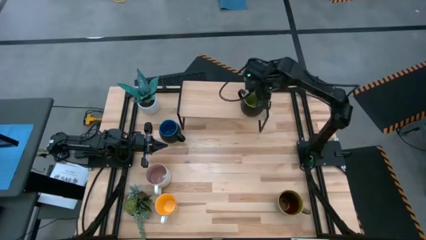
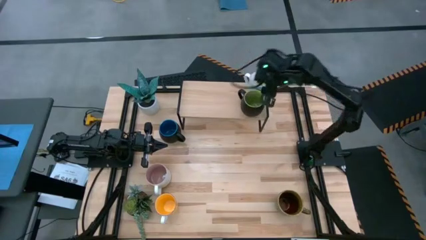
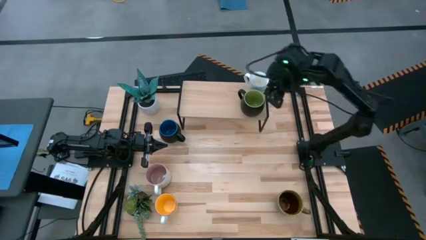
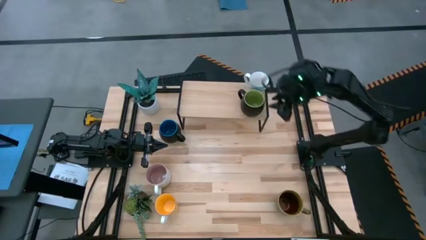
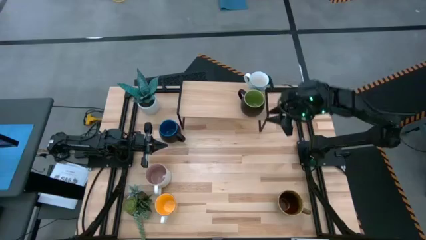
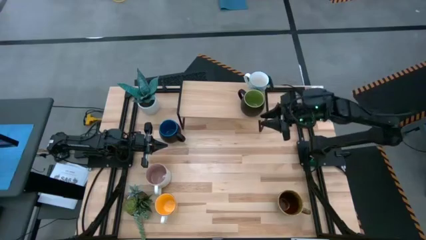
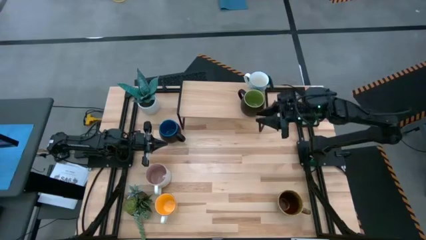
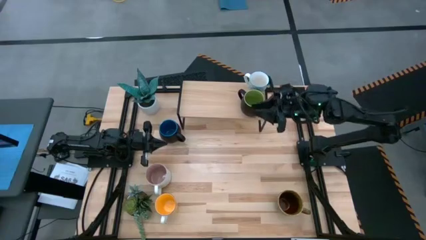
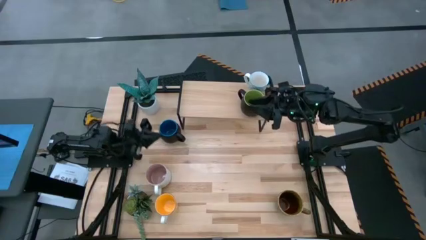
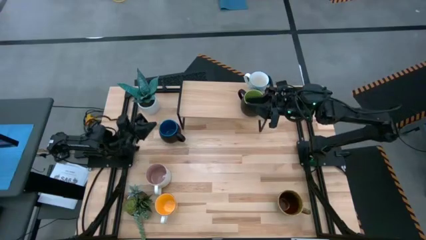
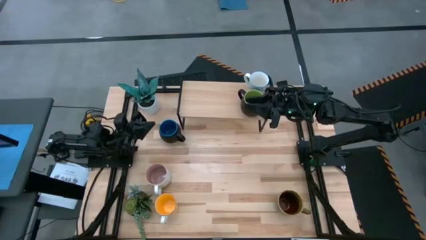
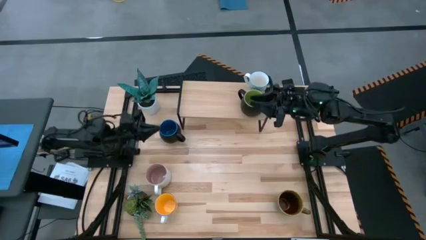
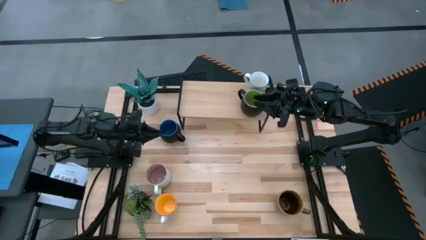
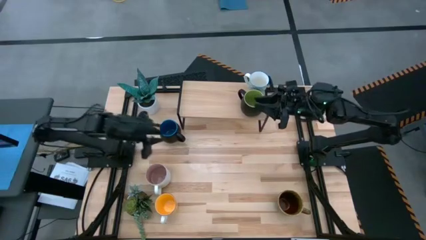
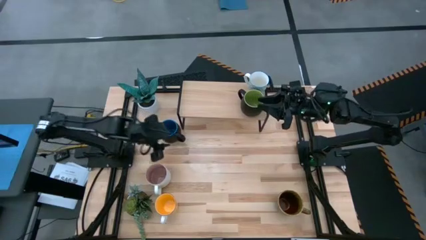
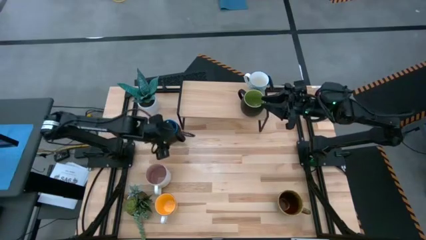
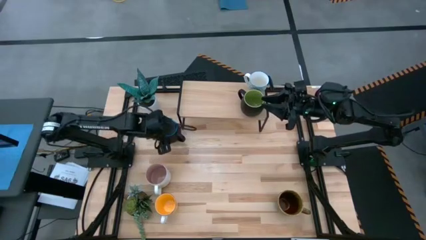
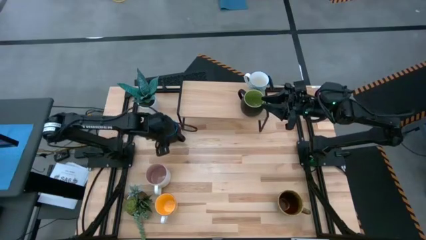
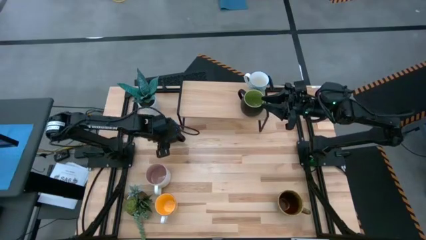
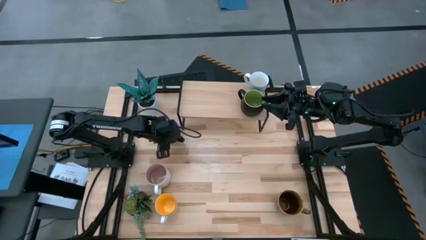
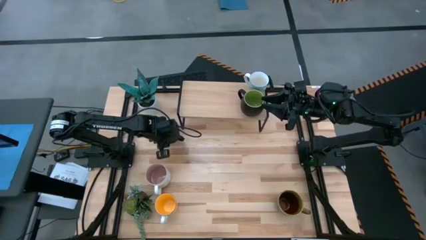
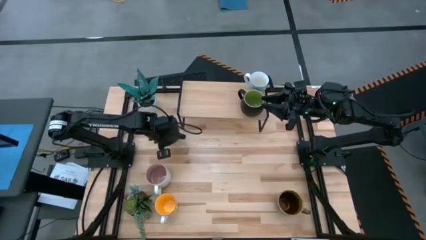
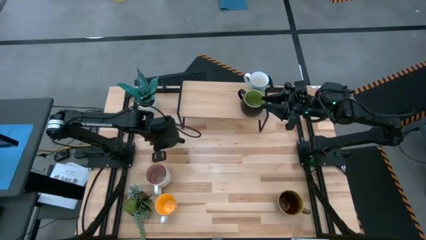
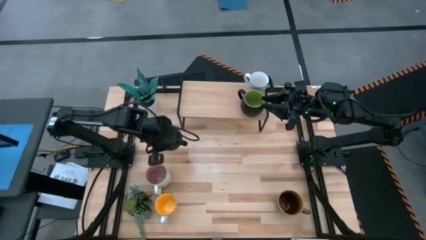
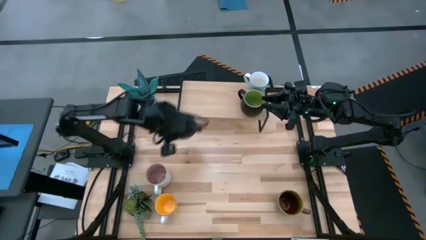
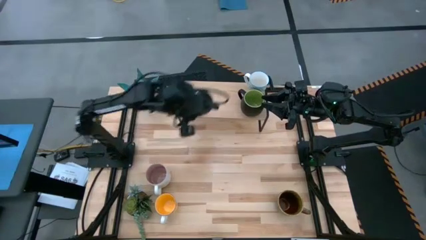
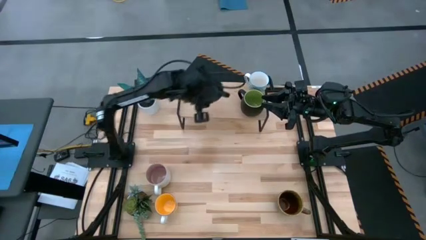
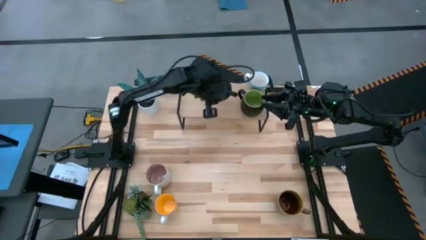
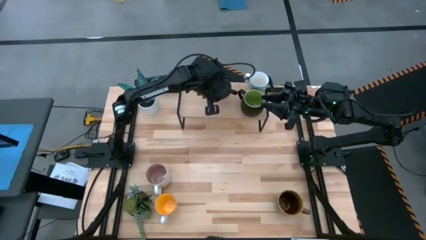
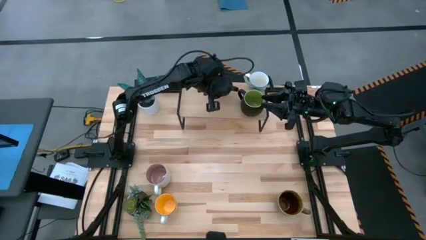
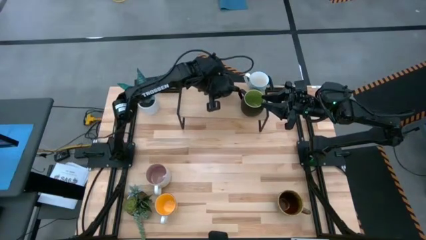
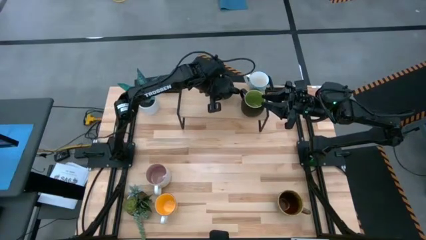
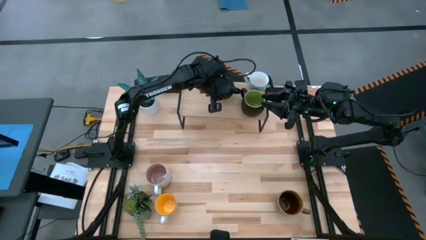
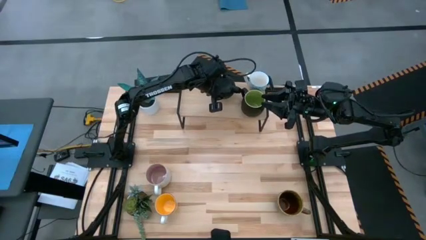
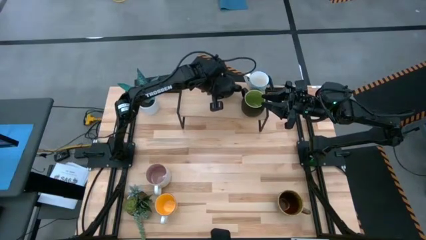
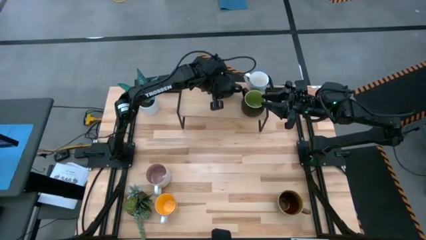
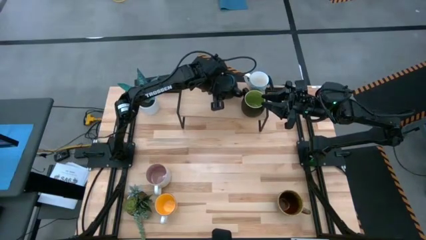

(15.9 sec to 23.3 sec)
Task: Place coffee mugs
Put the black-blue interior mug on the shelf

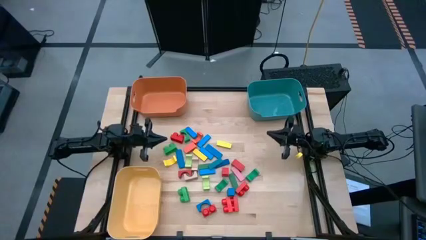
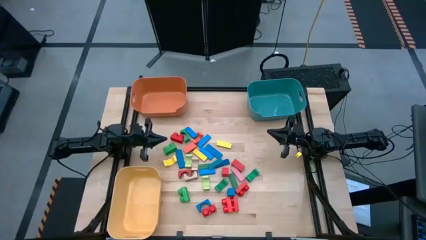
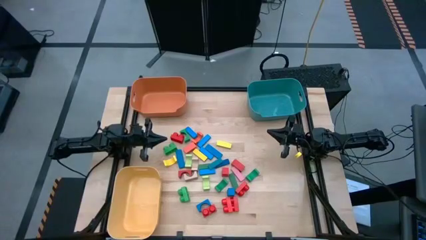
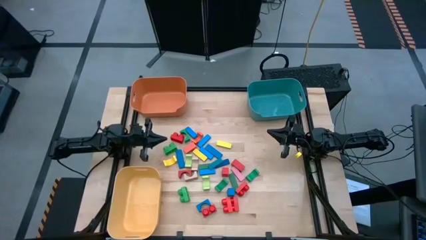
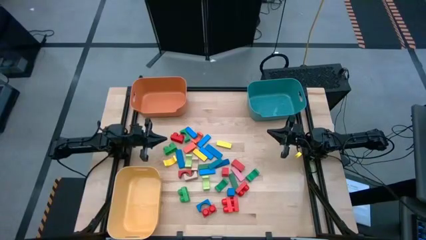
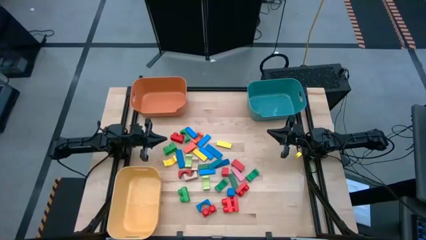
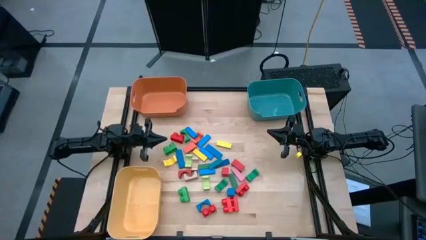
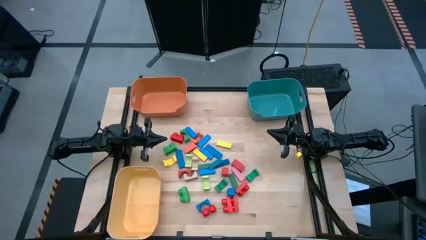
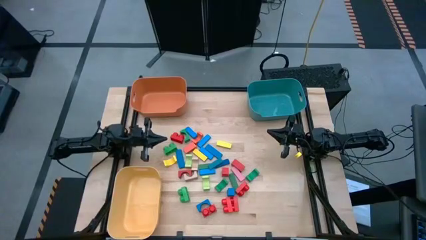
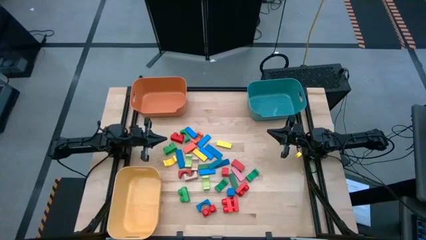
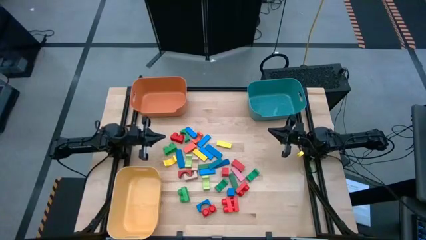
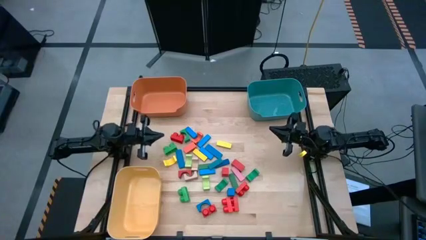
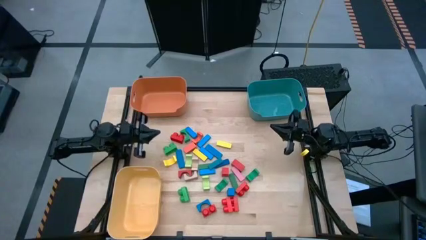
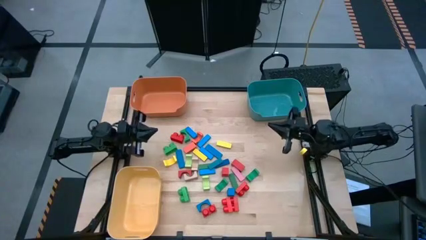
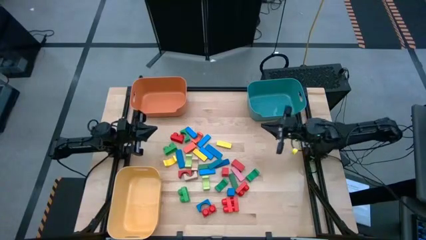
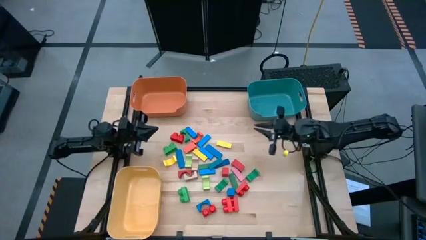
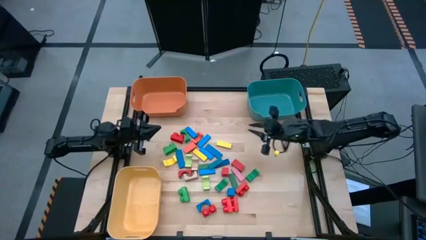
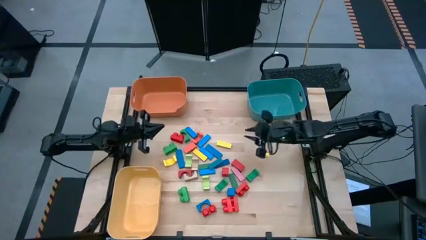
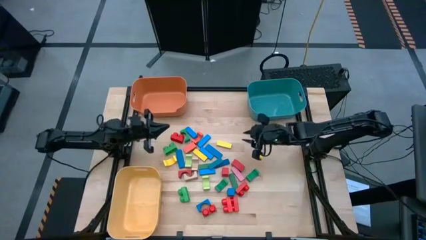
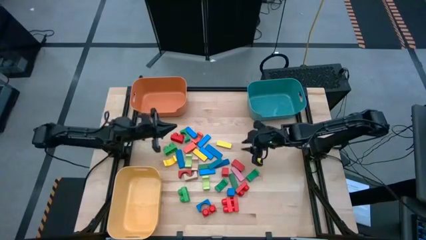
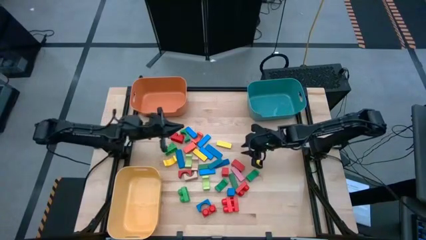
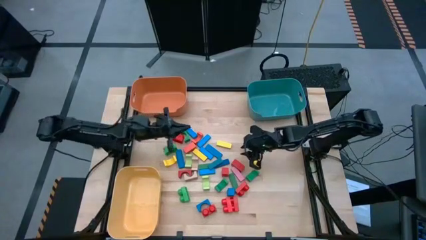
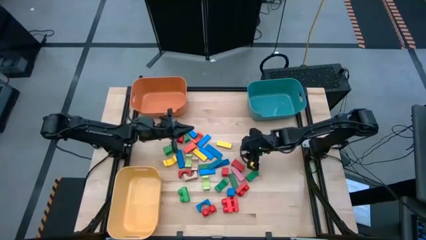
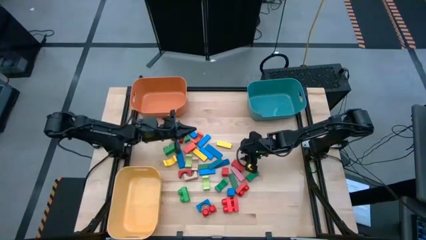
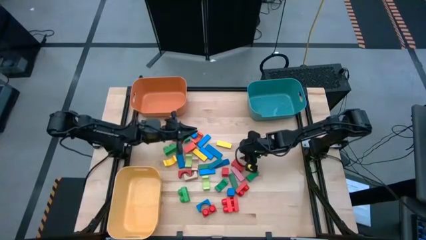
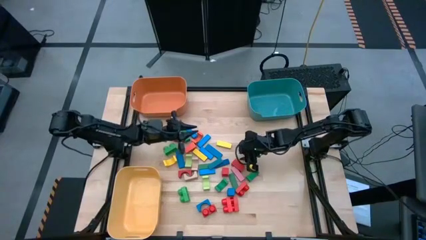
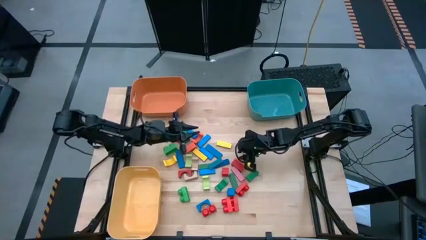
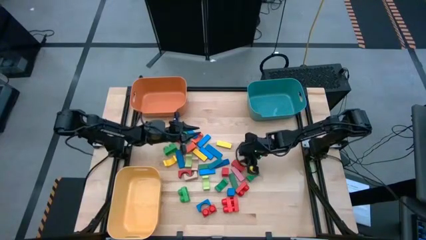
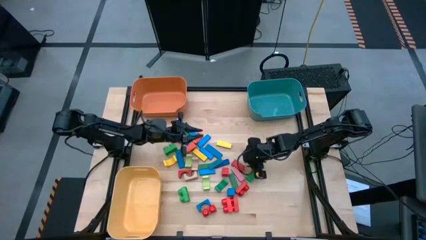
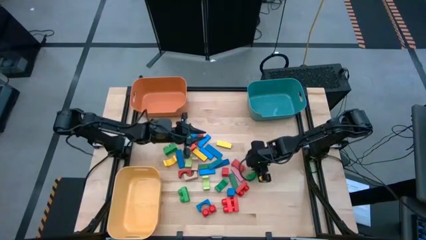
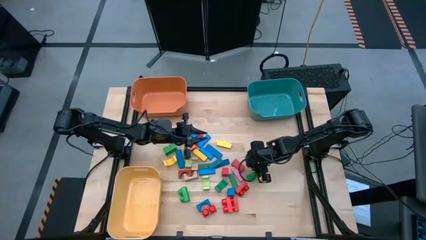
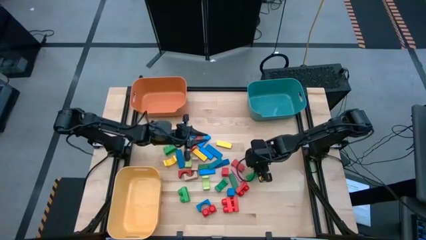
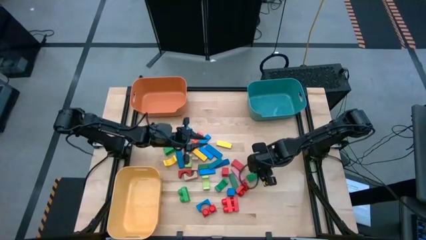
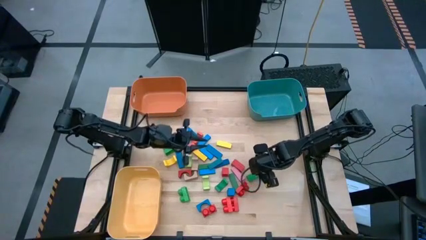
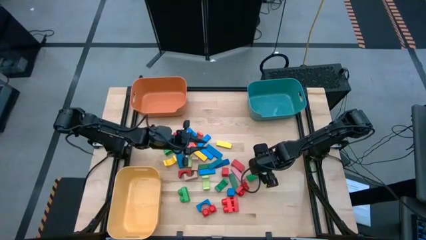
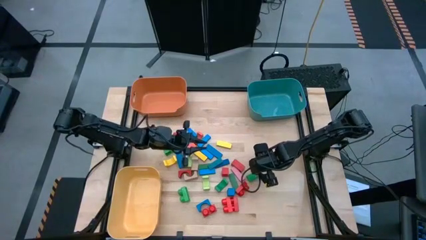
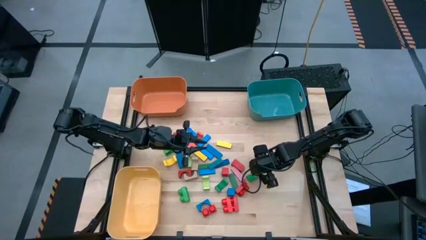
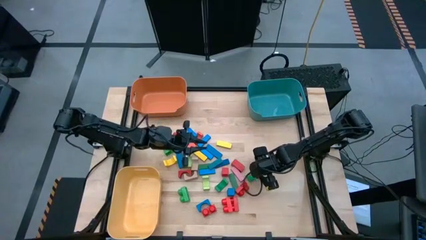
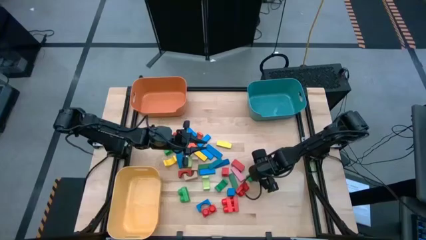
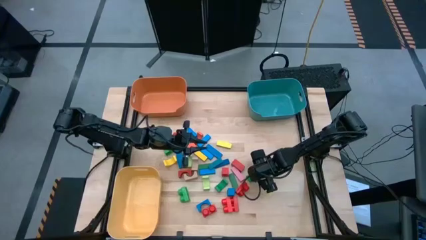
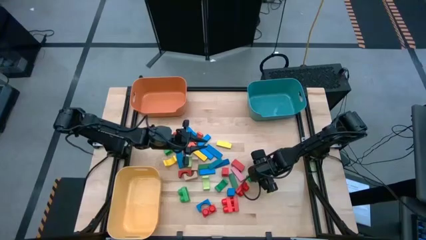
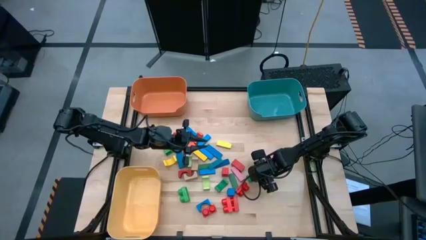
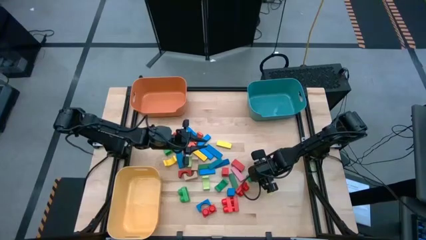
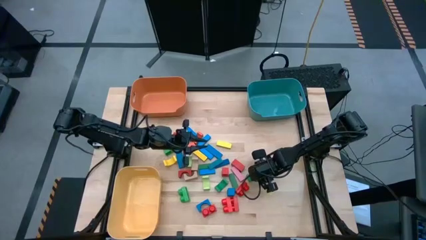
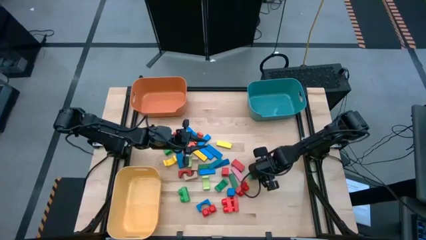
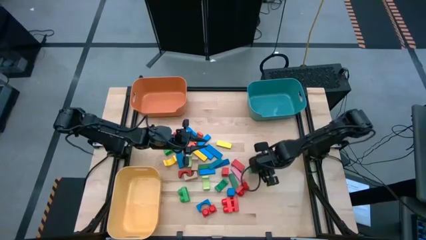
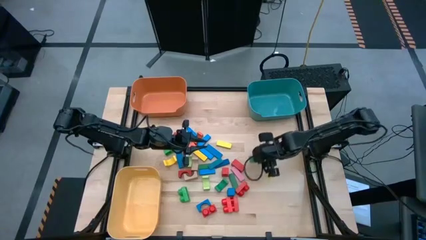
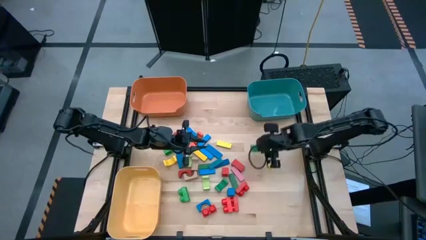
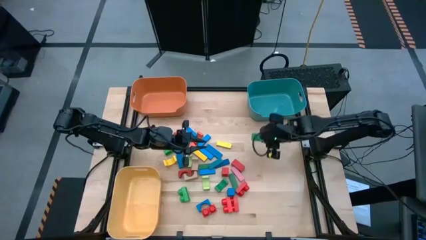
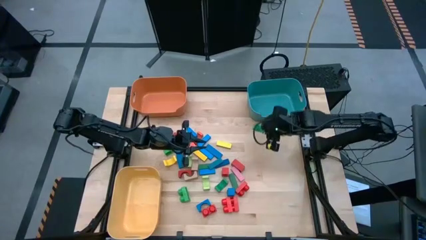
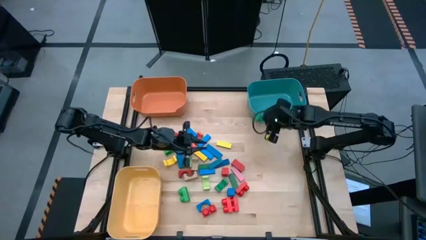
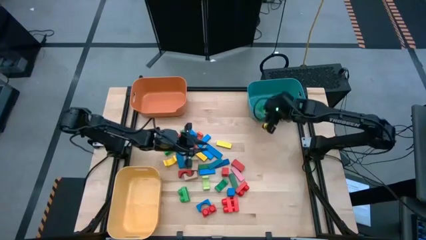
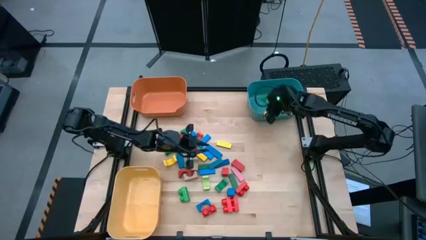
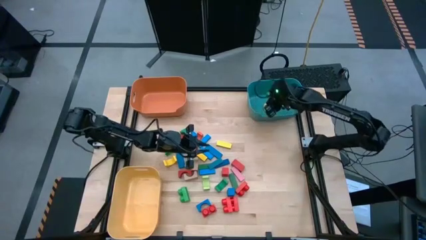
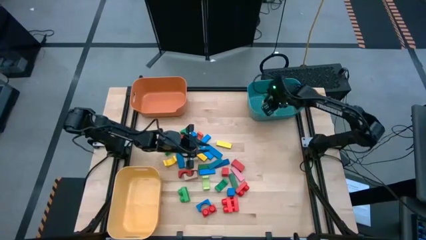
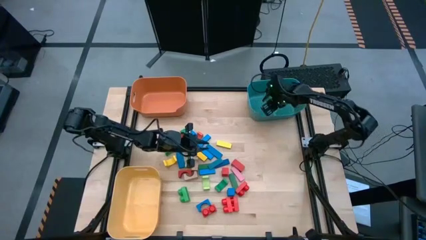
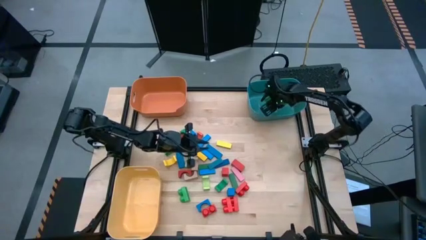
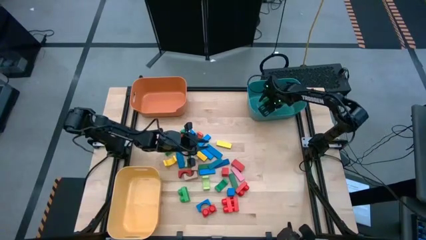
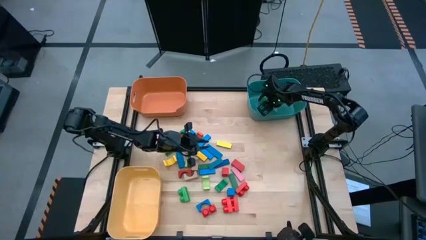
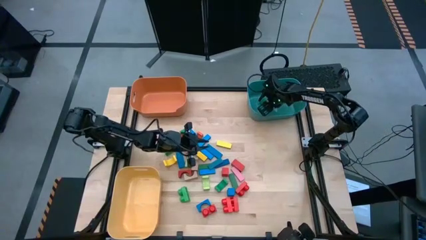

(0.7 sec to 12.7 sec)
Task: Sort blocks by size
Put the green arch block into the blue bin
